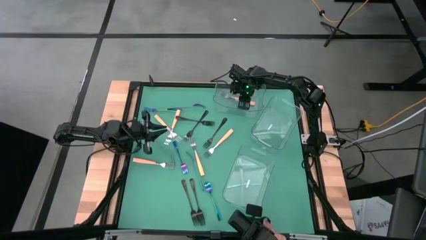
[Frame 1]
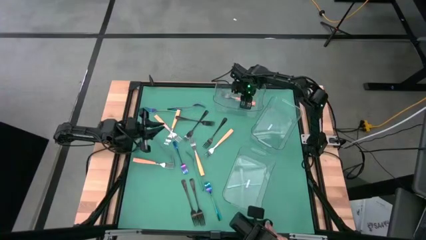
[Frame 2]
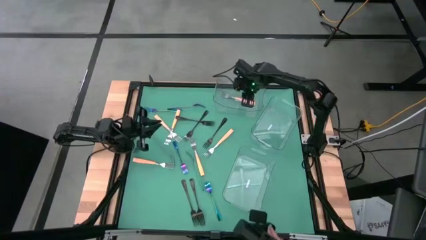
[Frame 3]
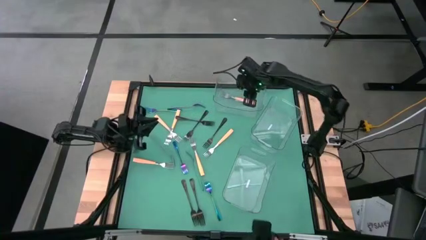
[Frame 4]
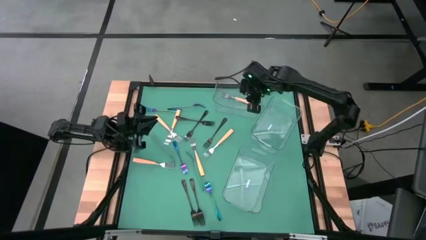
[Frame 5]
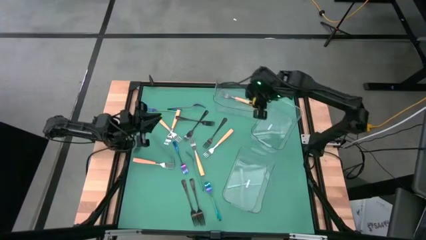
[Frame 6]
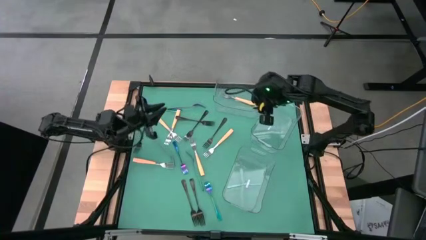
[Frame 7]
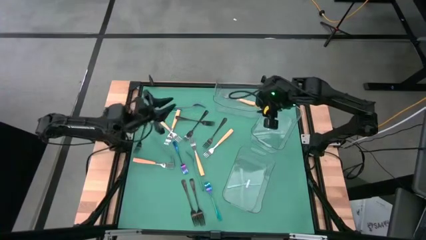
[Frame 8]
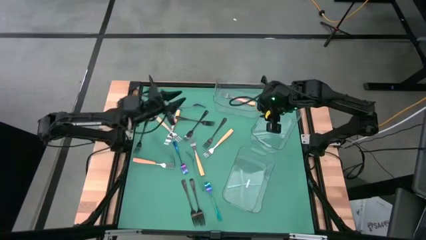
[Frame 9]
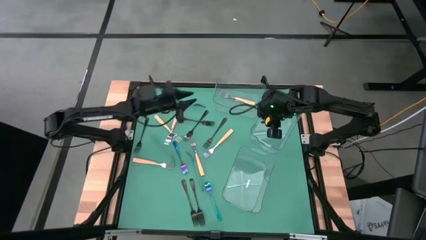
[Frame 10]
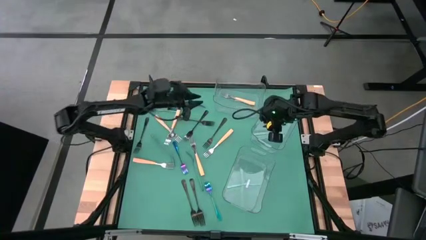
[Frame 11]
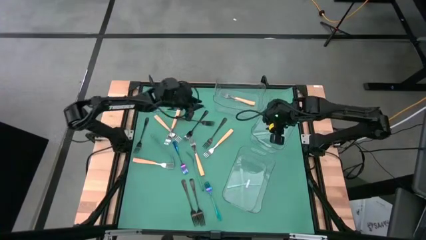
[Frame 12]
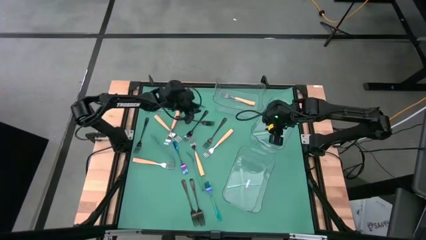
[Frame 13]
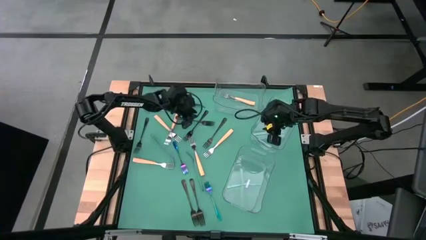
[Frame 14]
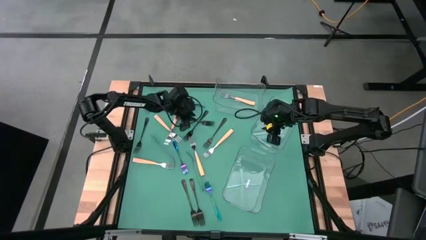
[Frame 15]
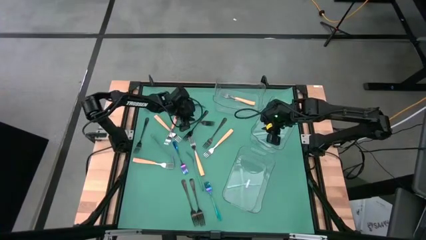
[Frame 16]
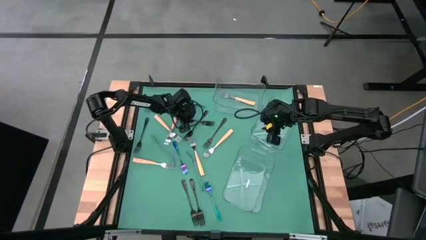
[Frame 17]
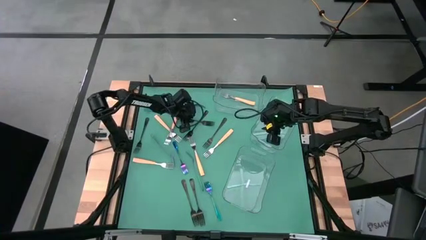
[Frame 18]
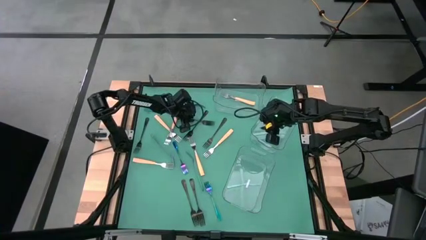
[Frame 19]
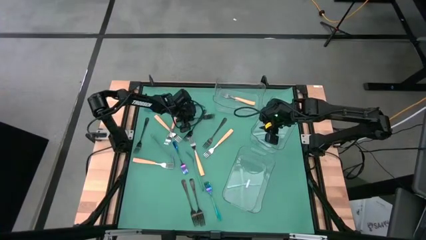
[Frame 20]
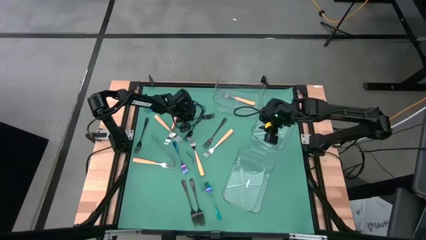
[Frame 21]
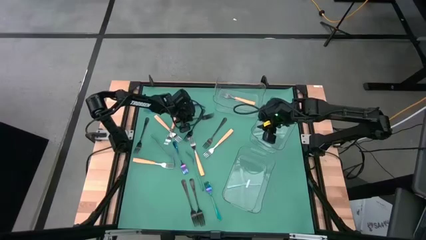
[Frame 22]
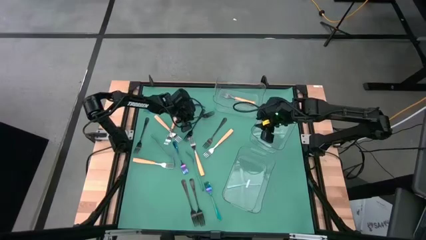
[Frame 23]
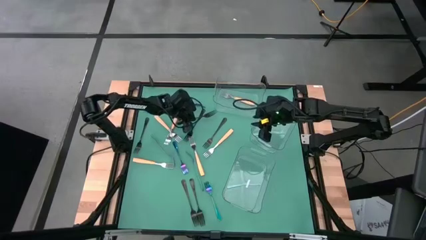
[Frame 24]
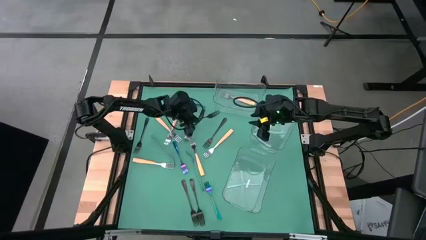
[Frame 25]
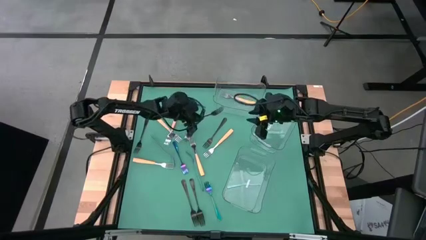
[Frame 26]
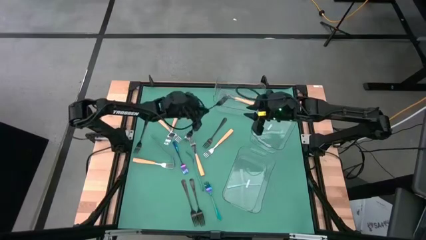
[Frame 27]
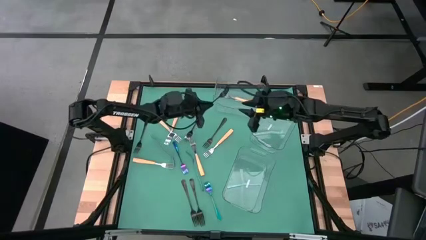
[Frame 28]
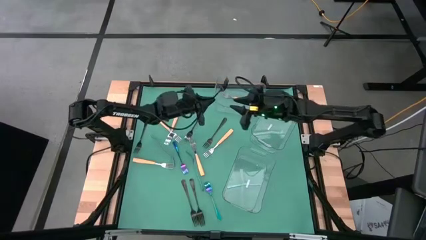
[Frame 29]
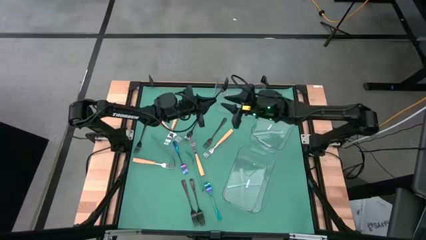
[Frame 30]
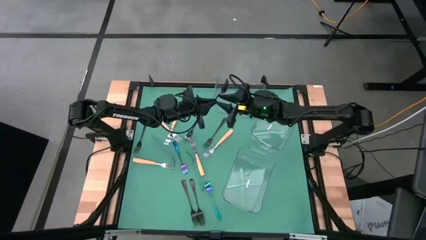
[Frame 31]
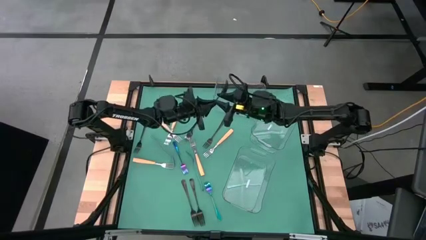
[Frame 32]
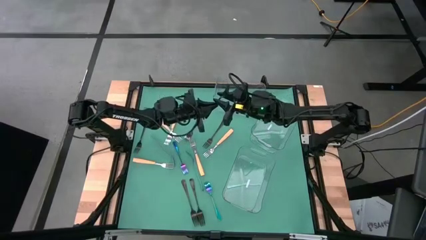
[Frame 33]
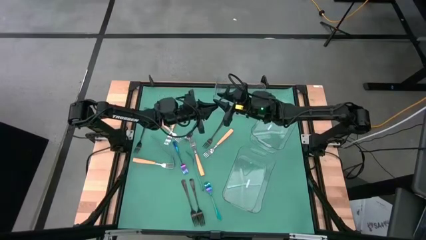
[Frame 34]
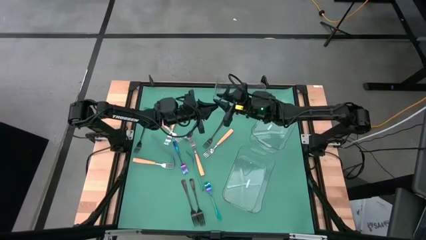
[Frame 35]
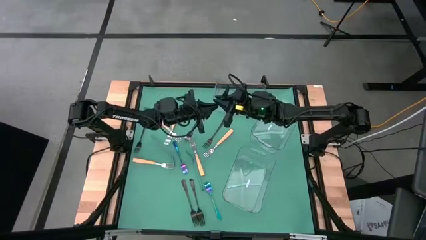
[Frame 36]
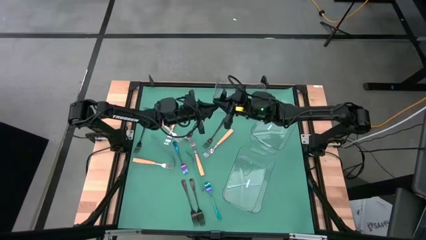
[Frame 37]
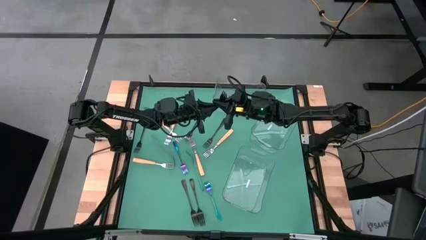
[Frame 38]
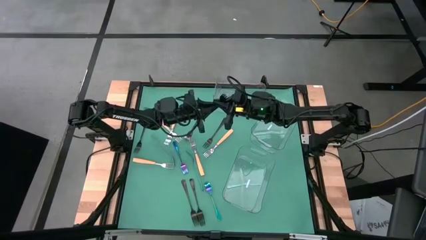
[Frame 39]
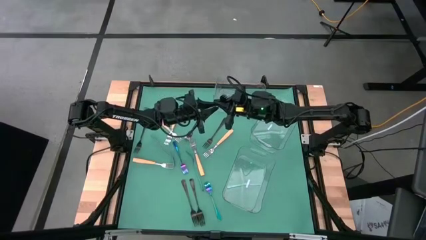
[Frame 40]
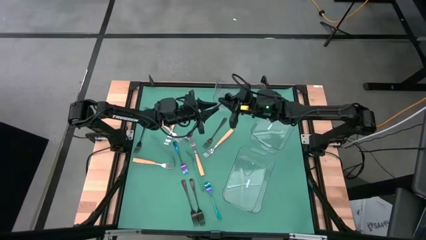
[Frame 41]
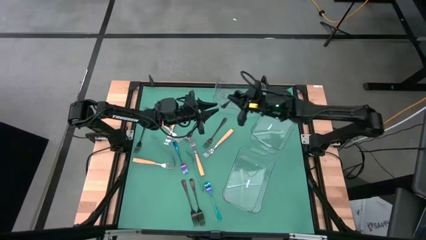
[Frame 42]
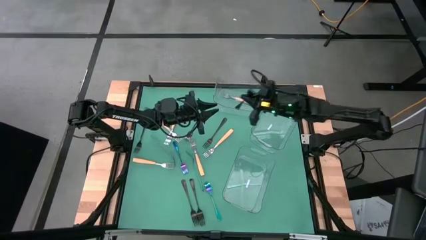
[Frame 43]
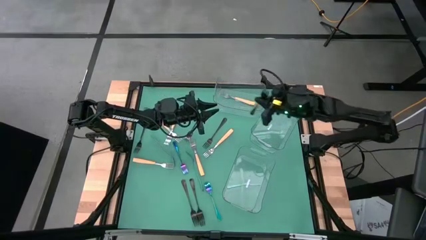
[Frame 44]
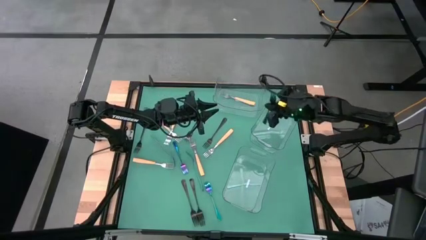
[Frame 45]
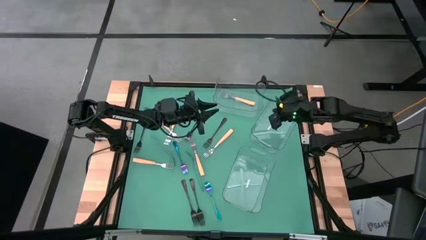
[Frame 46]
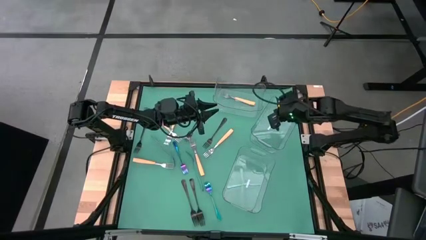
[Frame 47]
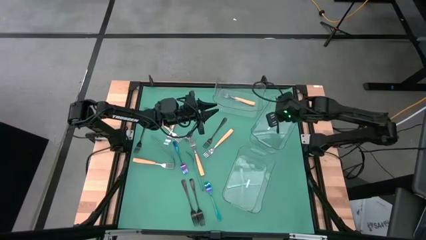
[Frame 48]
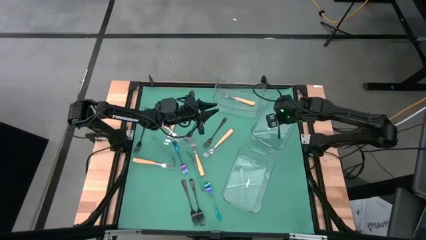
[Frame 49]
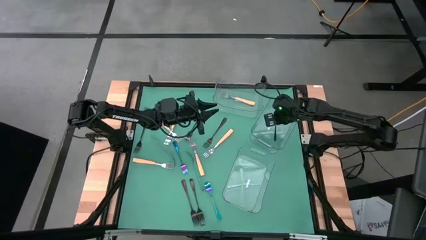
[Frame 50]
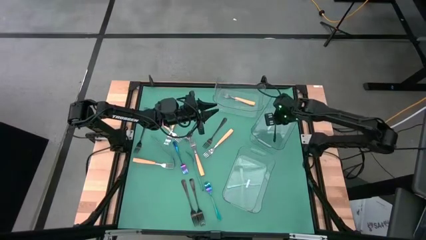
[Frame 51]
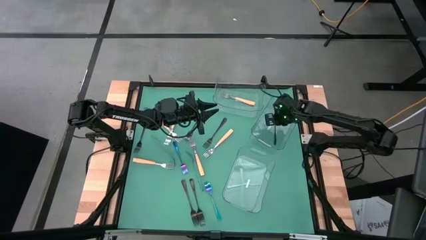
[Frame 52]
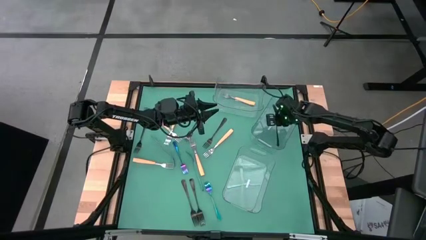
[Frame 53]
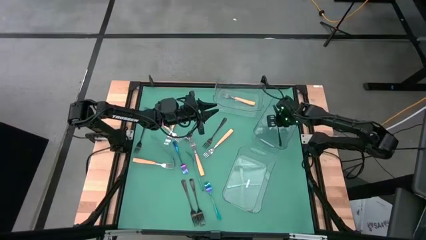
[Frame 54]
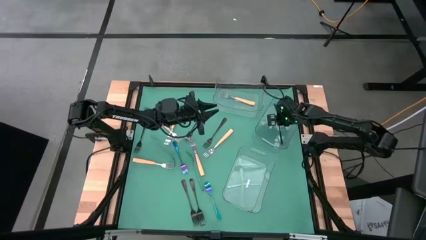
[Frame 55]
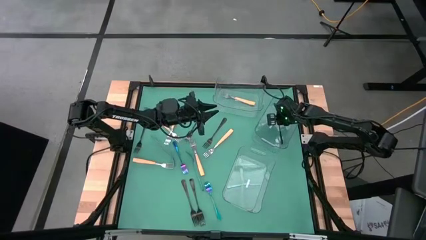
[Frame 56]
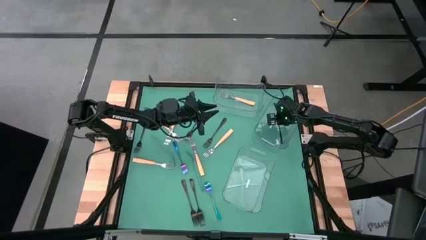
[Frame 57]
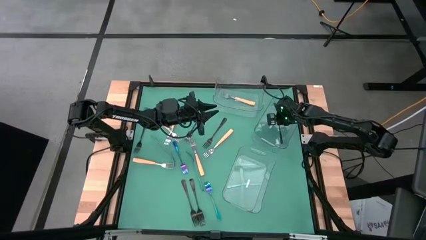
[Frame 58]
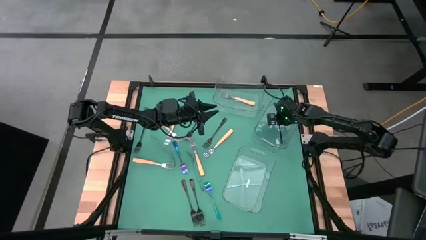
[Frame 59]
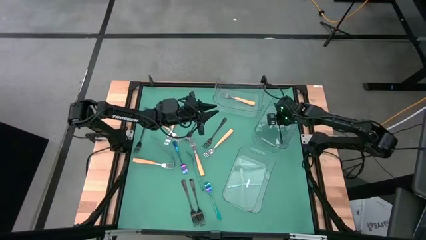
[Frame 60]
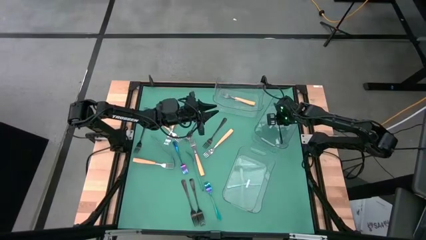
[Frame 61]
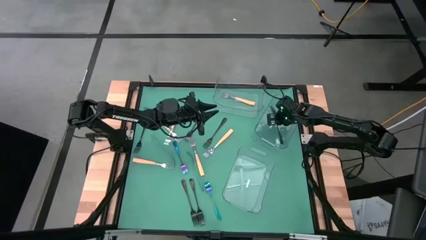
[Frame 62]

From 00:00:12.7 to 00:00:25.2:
Task: Sort silverware by color (type)
Put the black fork into the center transparent bin

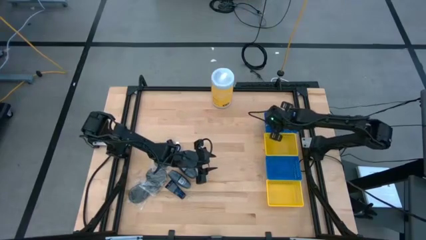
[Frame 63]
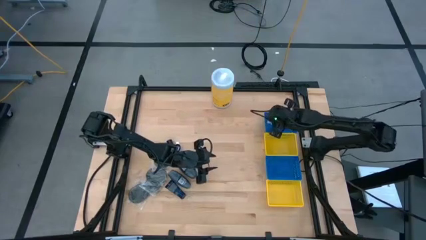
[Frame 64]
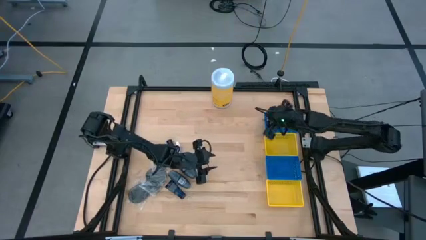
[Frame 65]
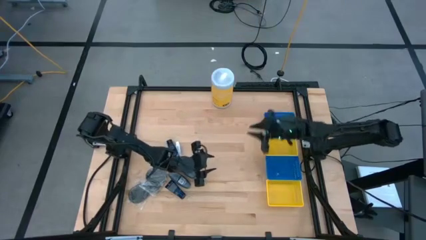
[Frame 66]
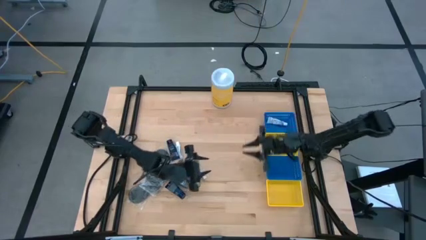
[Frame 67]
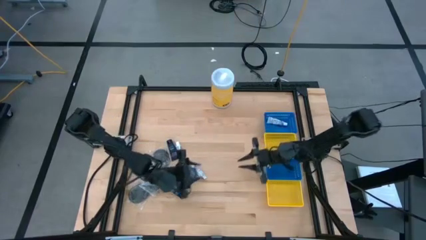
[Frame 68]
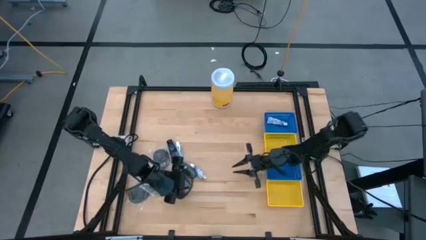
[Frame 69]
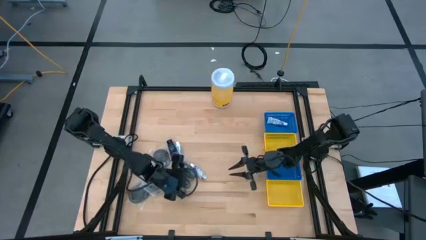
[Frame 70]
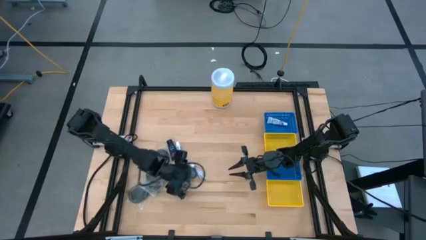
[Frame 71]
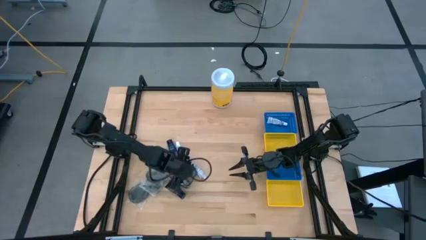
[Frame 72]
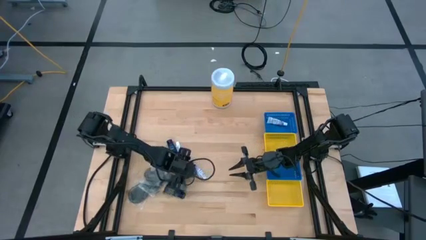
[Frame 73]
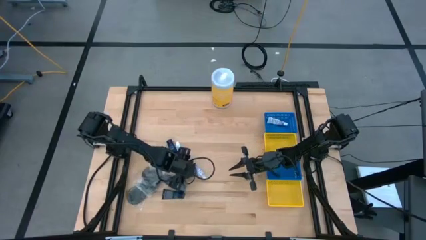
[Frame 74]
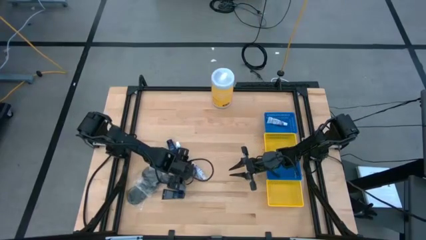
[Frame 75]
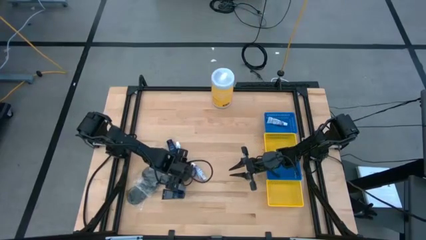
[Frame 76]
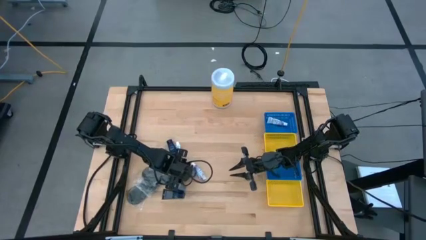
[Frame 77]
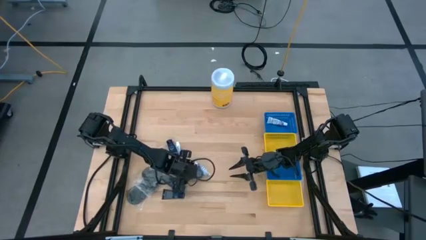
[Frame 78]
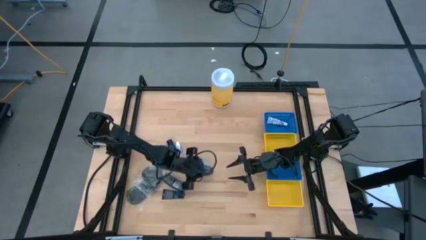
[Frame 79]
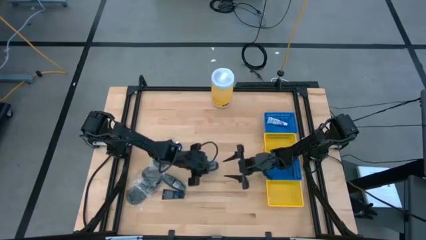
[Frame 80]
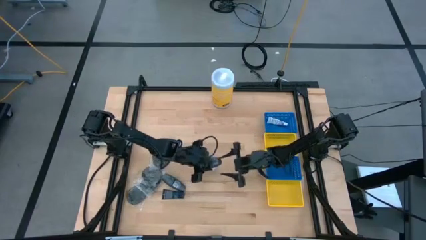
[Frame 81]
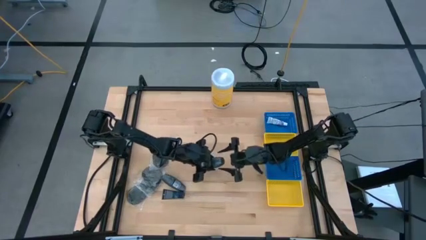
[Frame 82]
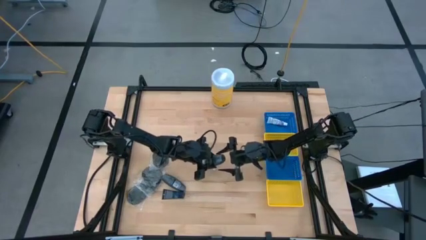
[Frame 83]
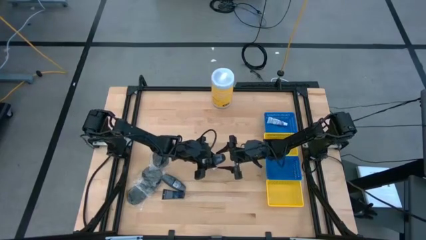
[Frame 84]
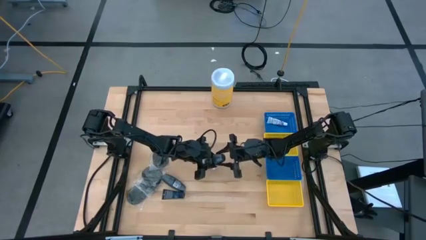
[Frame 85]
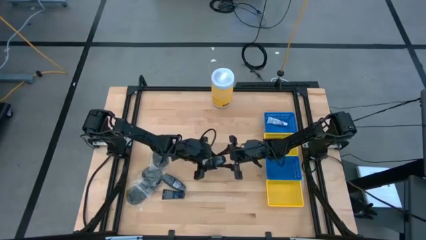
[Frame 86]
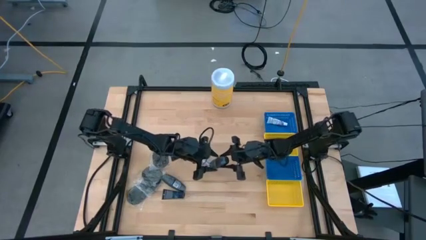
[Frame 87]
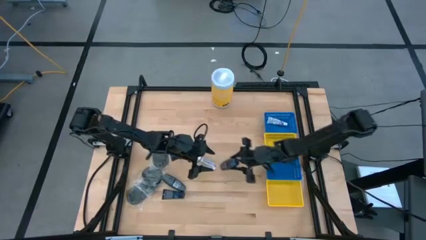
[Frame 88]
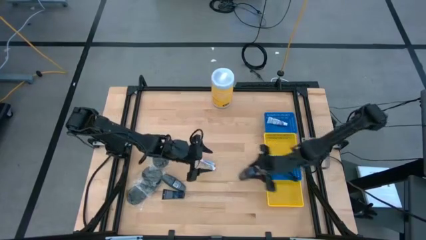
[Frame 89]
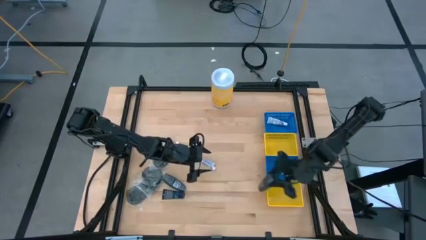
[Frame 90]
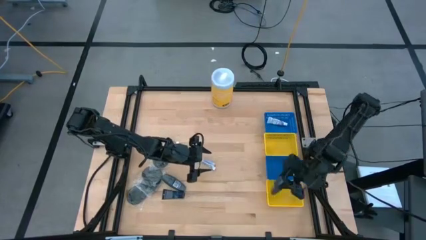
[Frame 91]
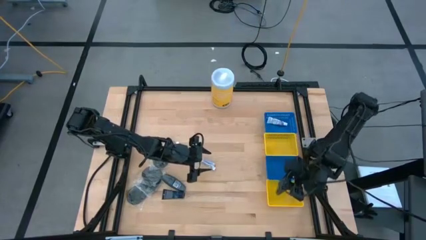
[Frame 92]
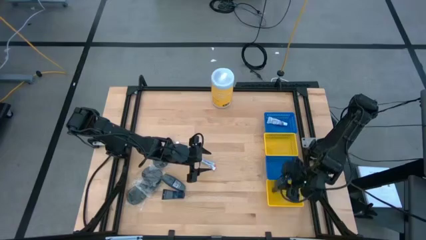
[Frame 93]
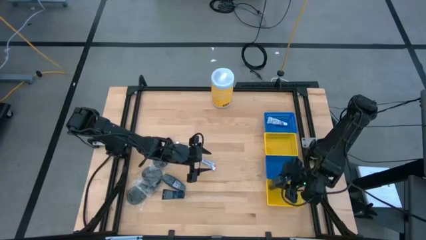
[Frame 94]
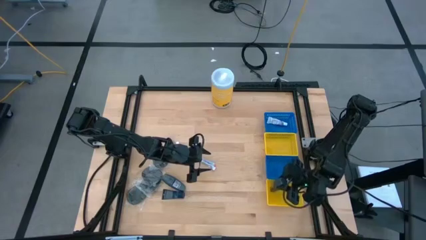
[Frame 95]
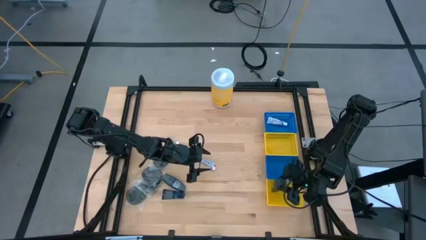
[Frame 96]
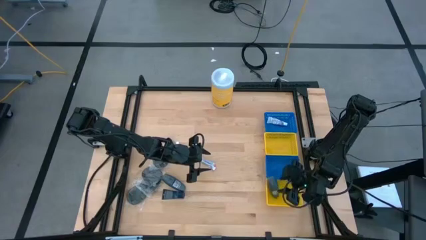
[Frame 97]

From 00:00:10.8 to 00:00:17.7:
Task: Pick & Place Travel size toiletries
Put the gray deodorant into the bottom yellow bin
